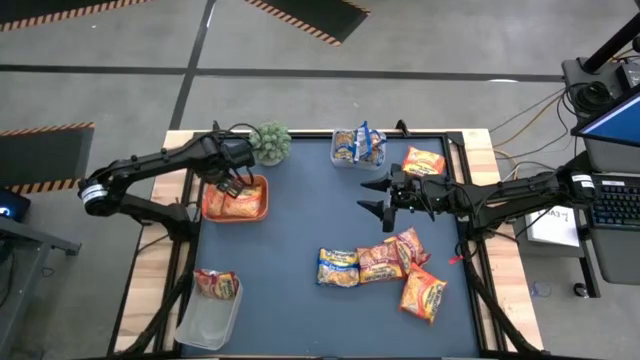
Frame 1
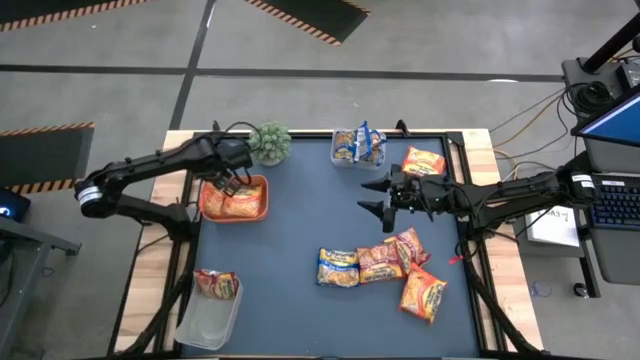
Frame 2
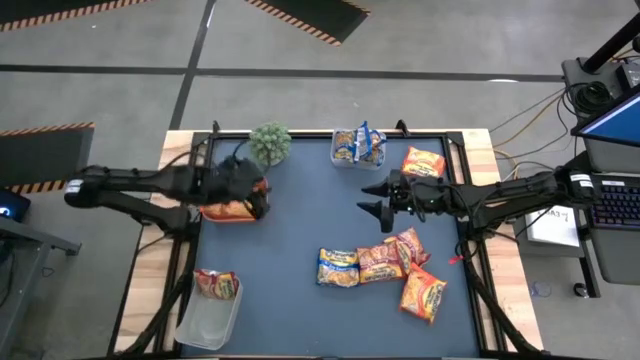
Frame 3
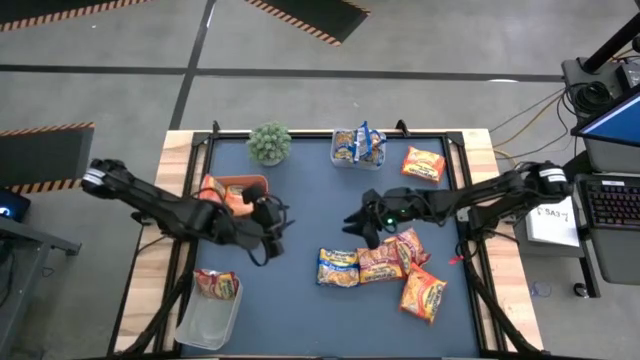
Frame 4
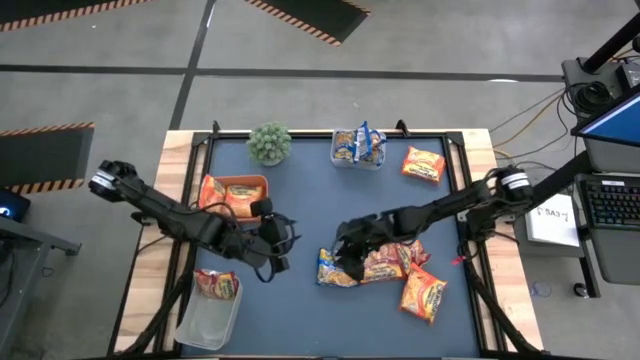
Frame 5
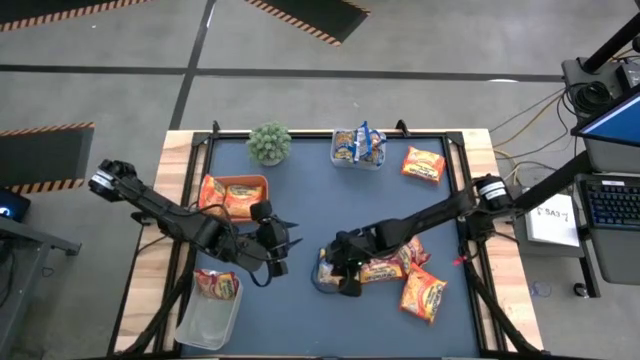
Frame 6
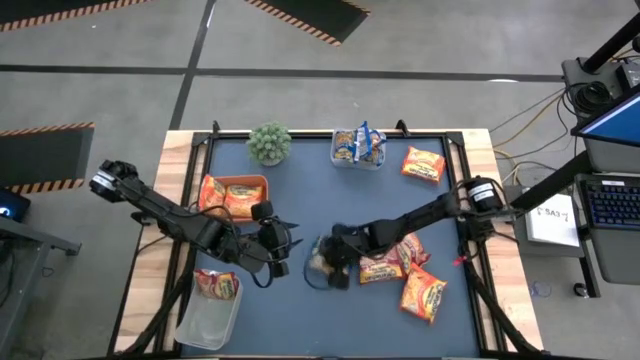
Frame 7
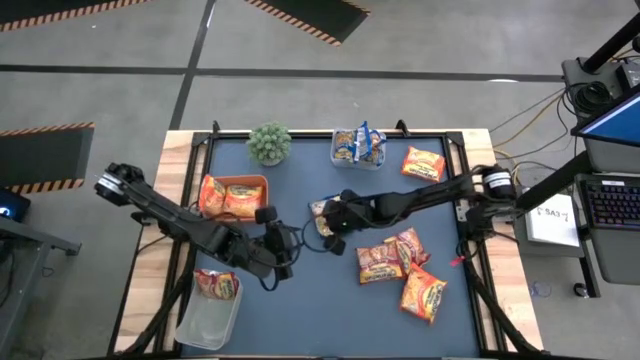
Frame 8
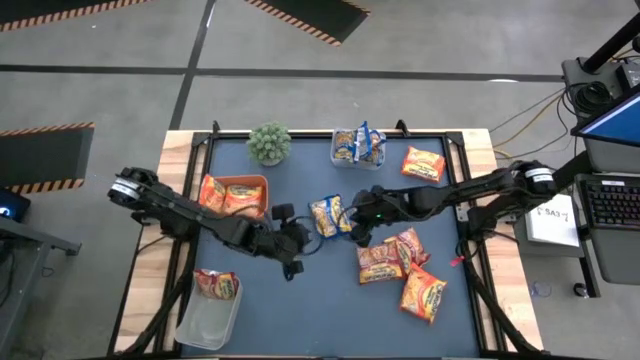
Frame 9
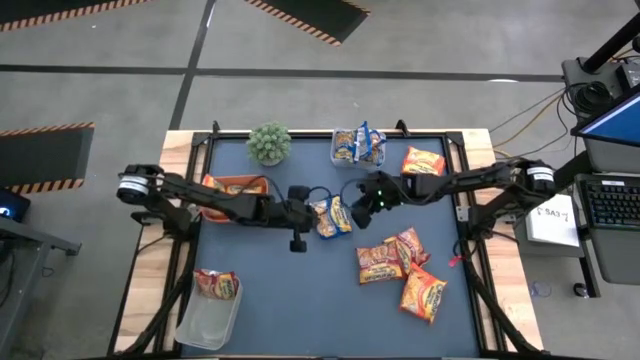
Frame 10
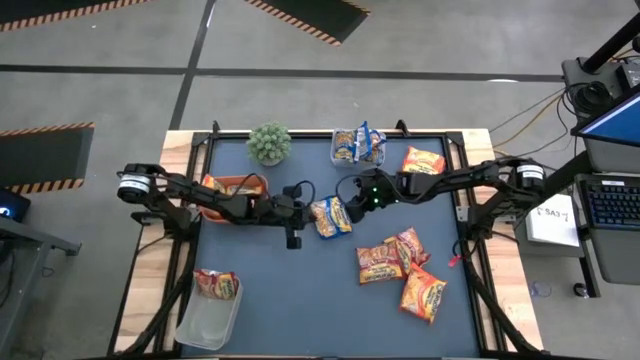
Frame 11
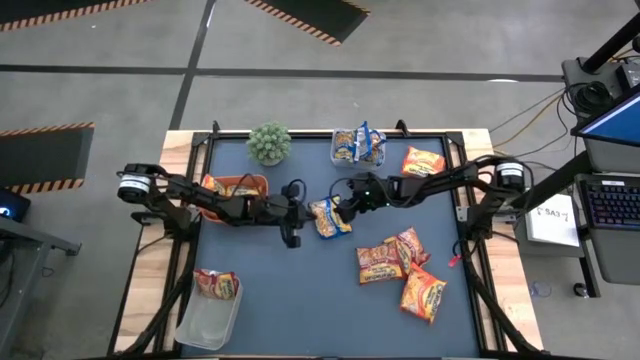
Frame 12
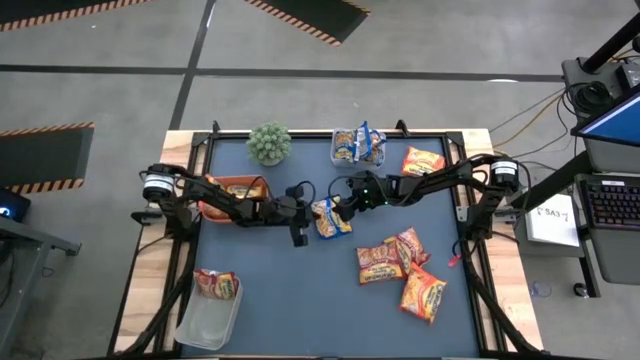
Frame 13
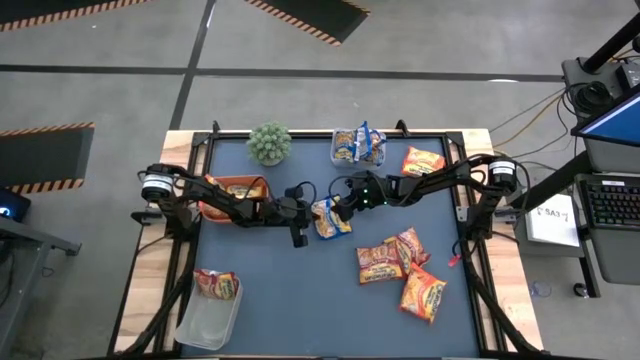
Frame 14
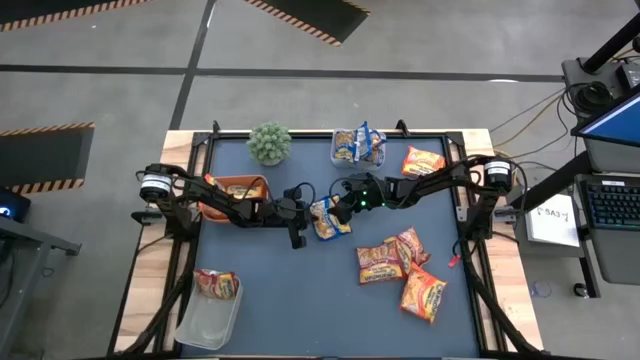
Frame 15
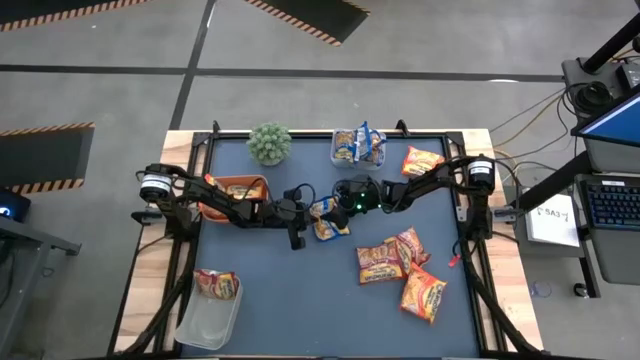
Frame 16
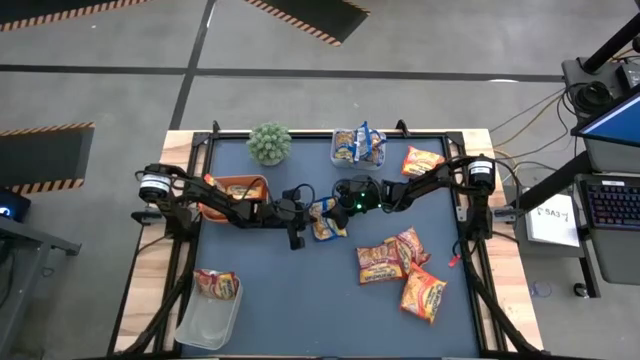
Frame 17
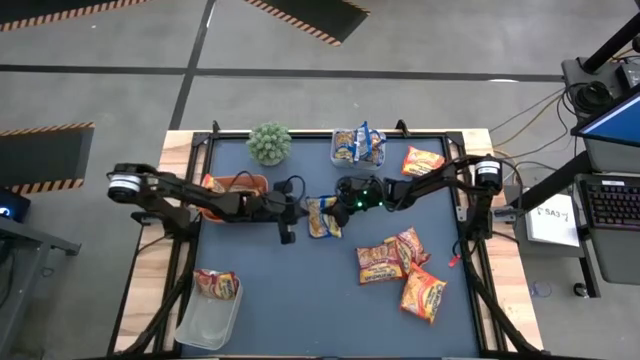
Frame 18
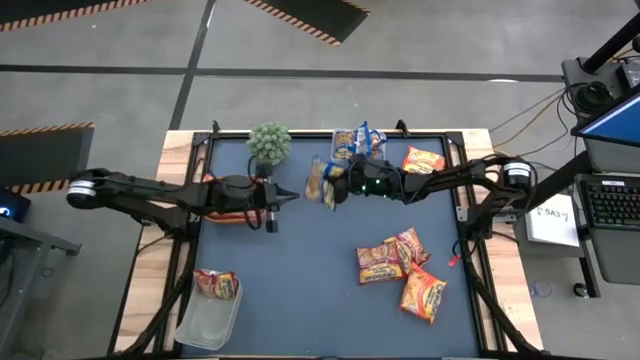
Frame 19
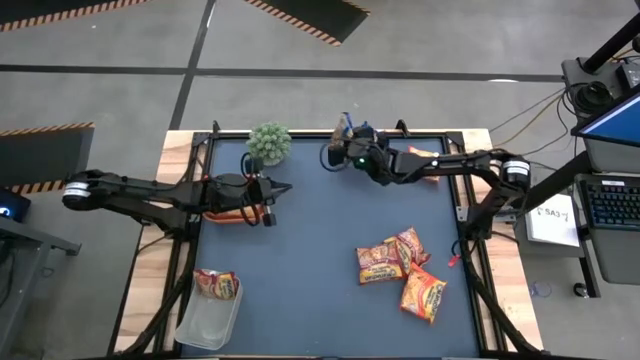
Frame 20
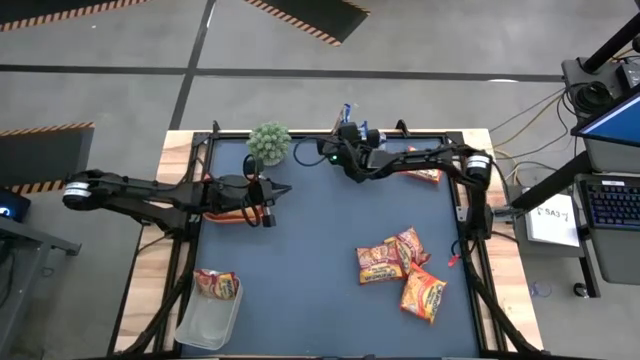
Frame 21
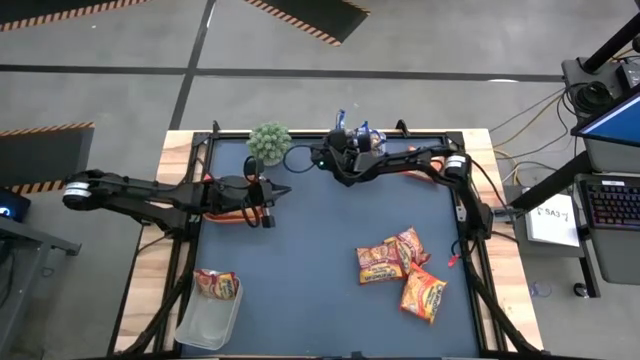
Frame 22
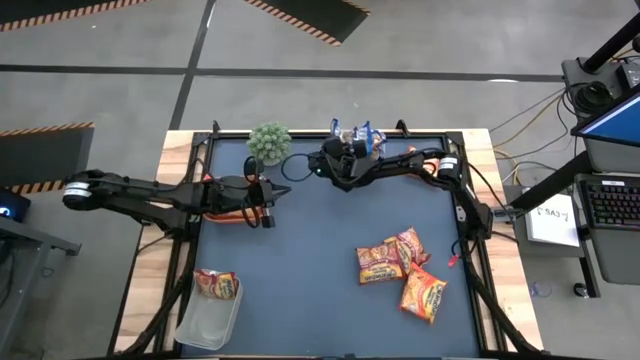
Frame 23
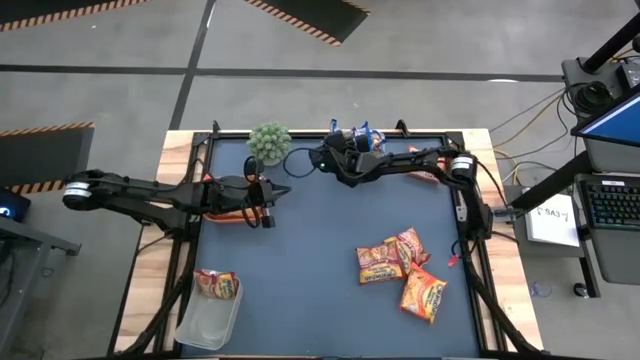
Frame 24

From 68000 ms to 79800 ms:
Task: Sort Maruchan noodles
Put the blue noodle pack into the transparent bin

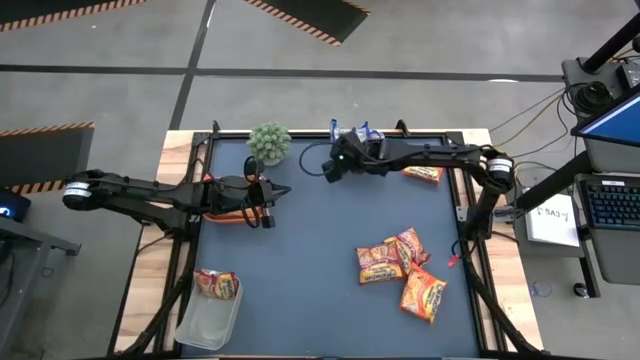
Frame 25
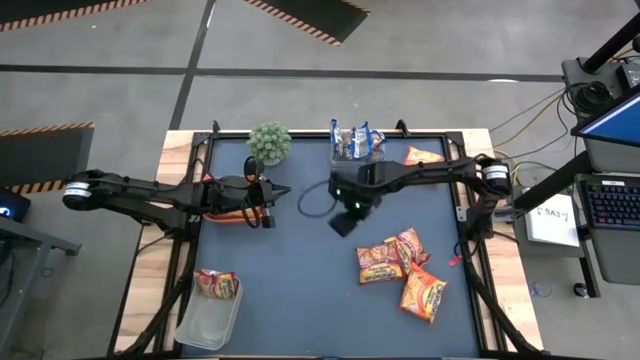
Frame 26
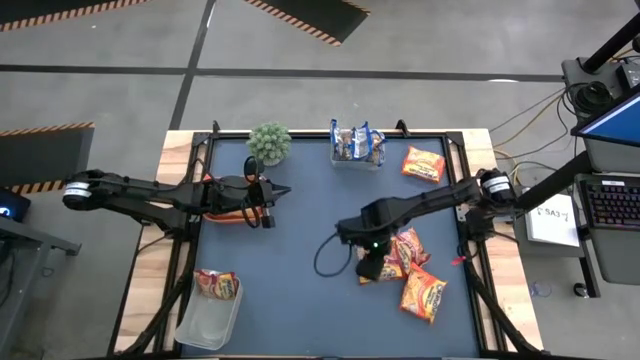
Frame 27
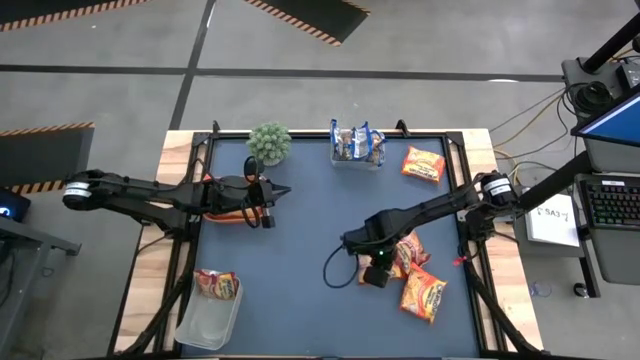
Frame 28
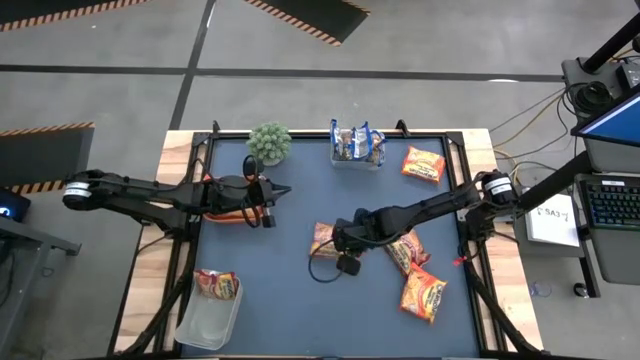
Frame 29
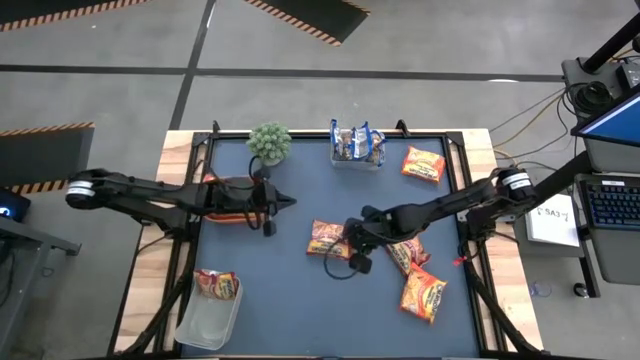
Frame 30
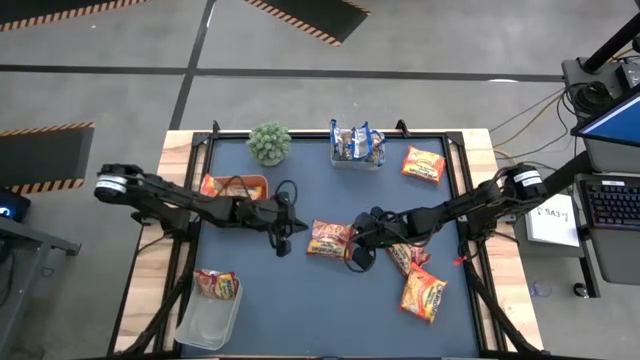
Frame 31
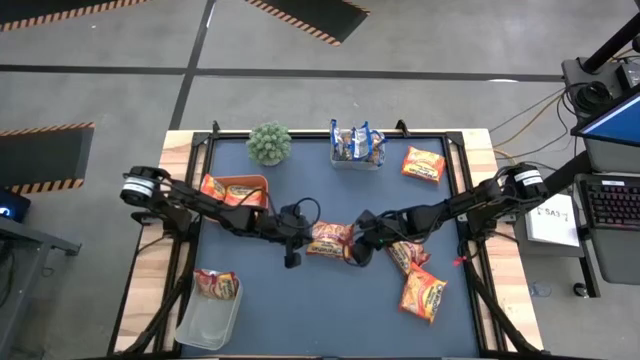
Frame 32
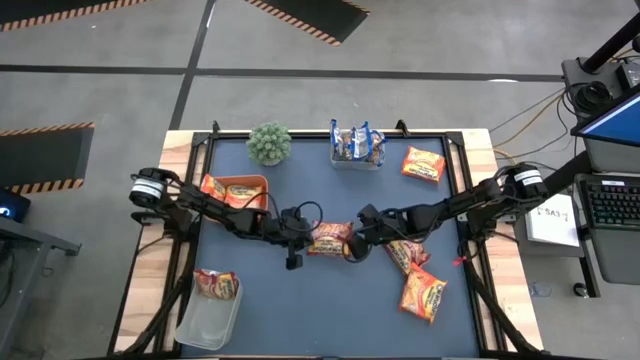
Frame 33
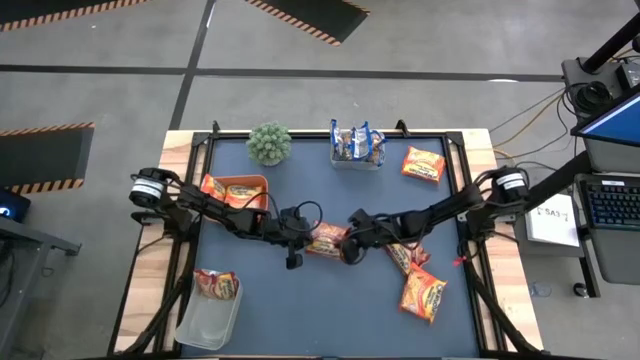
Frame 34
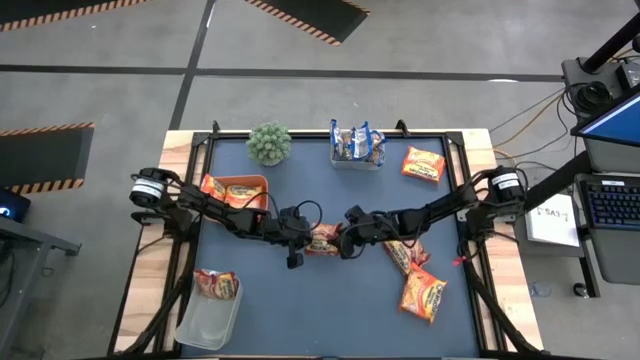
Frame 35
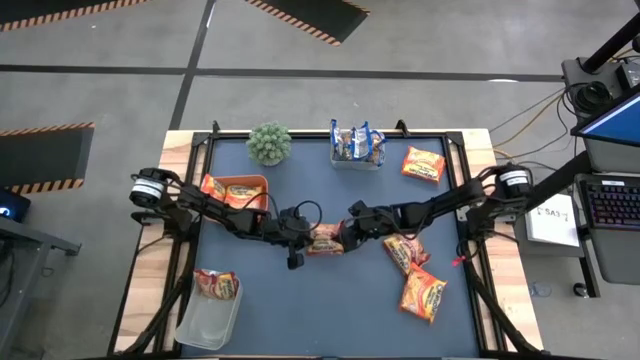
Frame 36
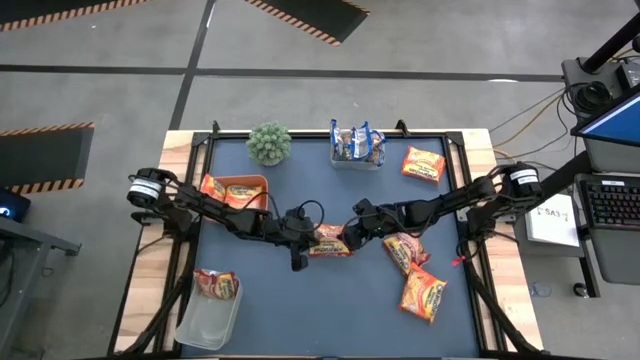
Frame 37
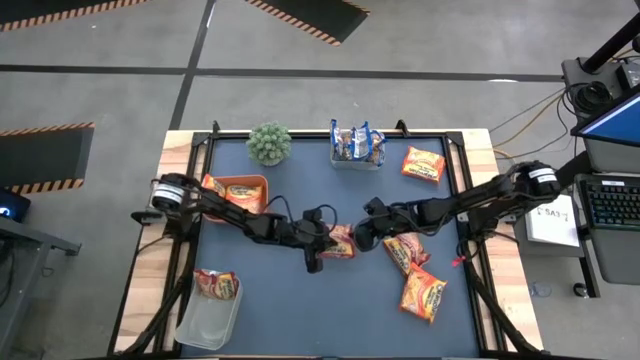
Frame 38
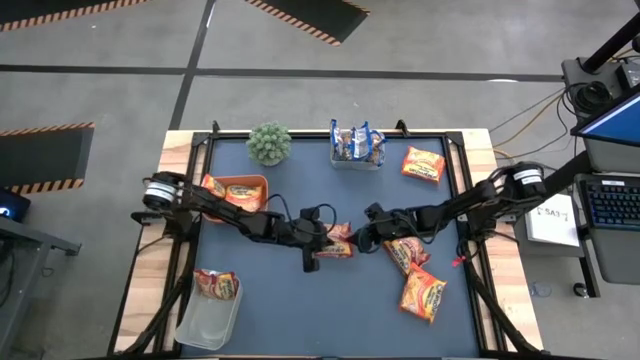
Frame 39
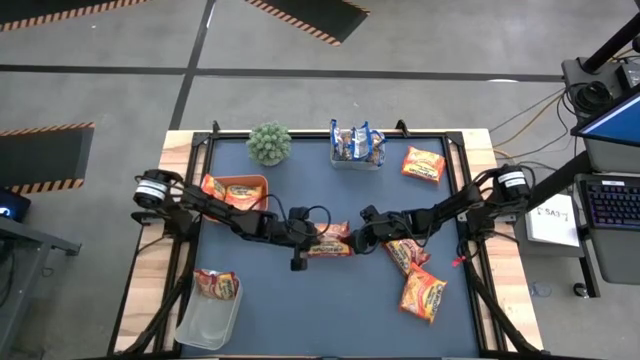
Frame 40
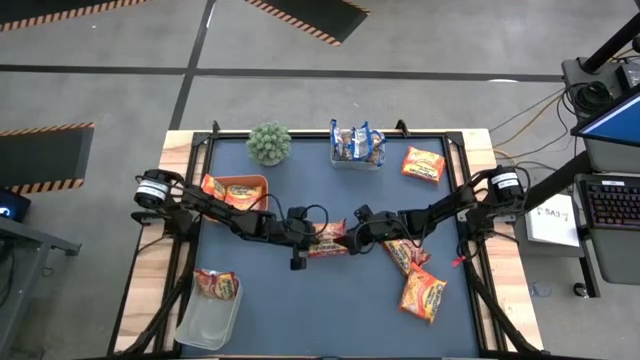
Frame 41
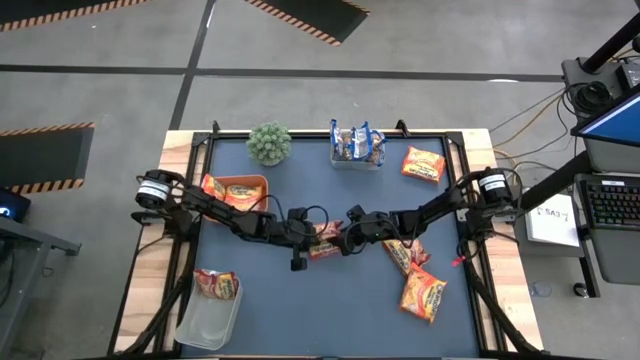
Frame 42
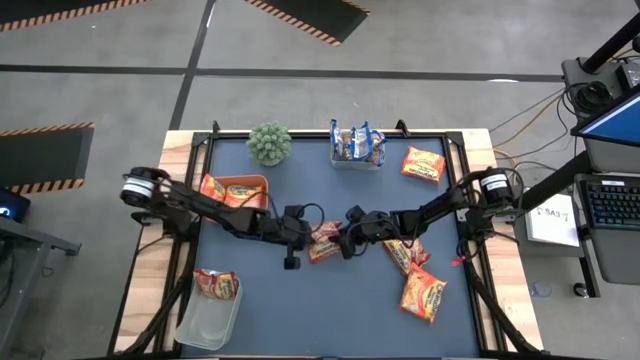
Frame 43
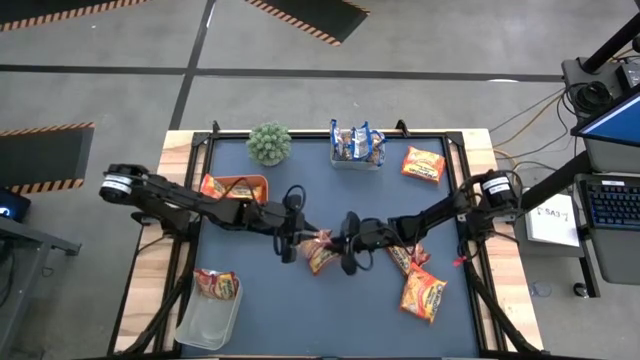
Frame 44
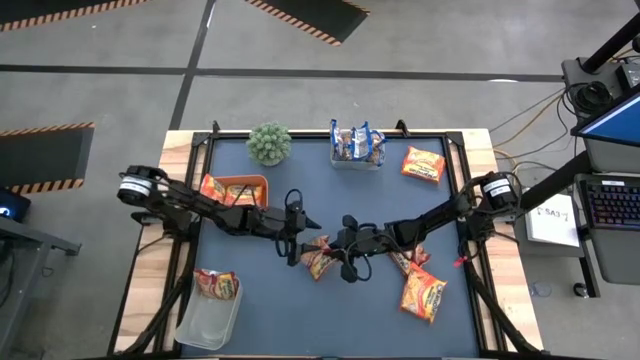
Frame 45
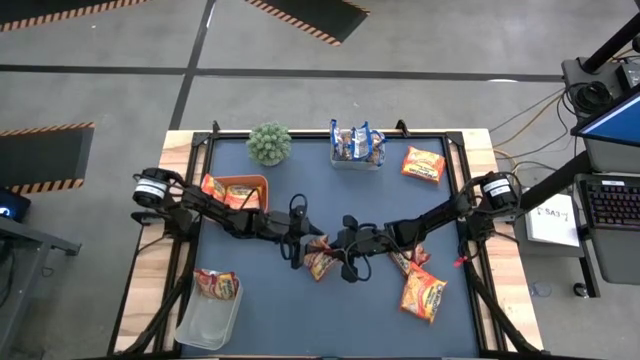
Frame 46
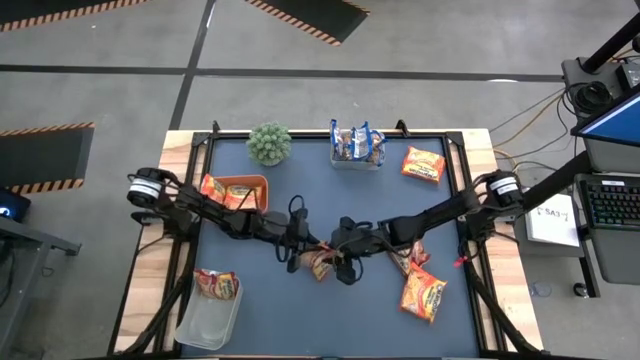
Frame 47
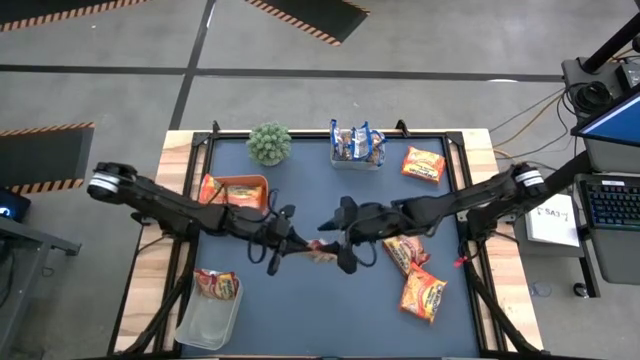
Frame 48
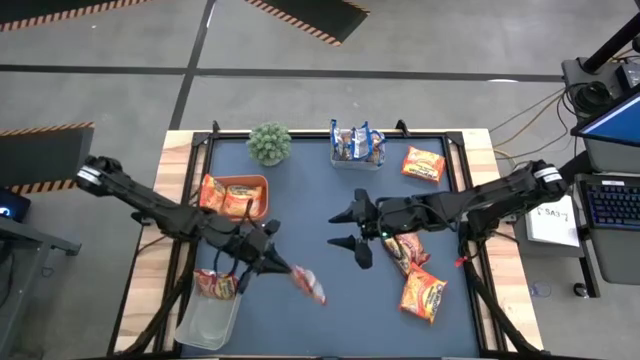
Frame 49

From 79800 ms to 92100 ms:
Put the red noodle pack into the gray bin
